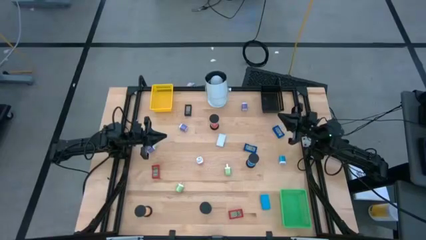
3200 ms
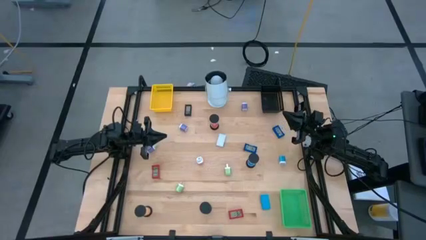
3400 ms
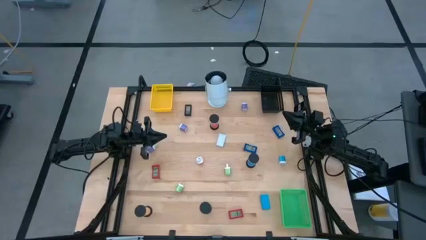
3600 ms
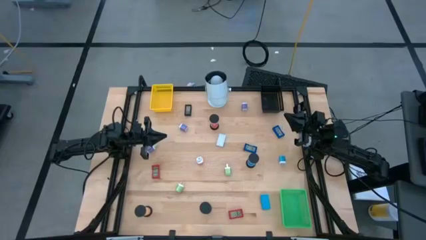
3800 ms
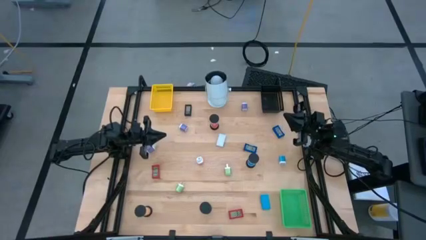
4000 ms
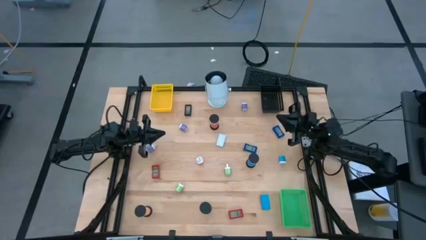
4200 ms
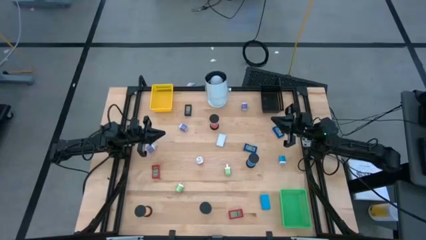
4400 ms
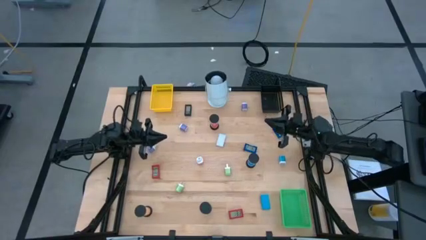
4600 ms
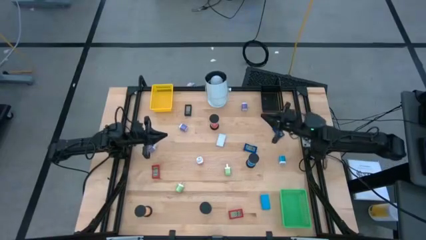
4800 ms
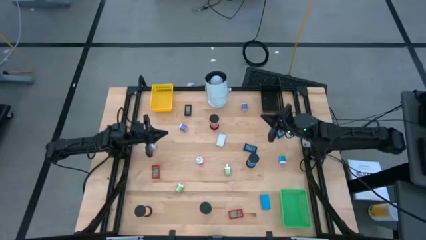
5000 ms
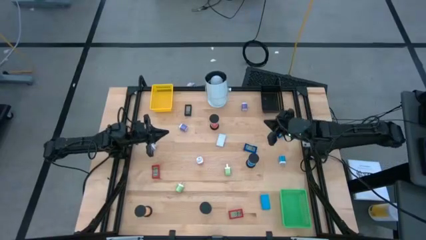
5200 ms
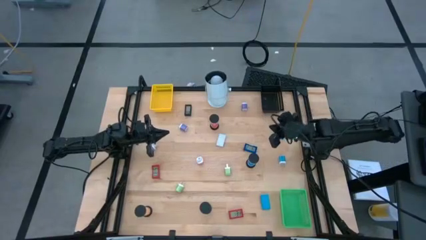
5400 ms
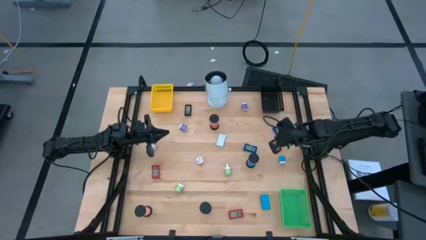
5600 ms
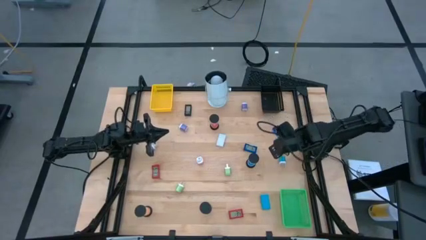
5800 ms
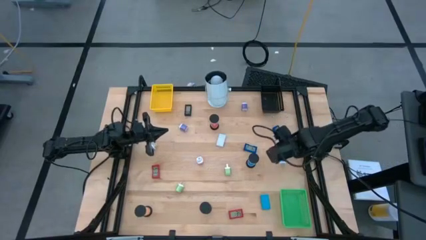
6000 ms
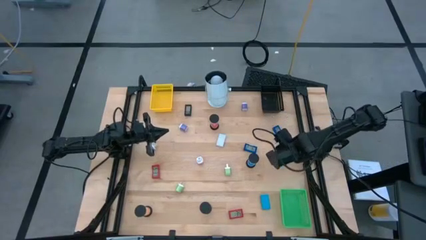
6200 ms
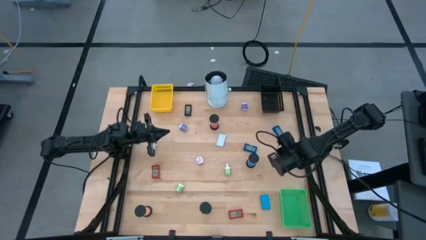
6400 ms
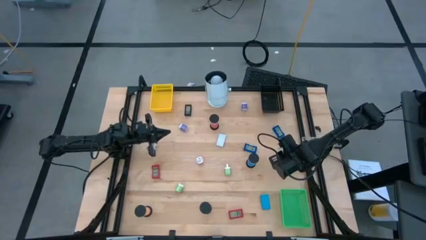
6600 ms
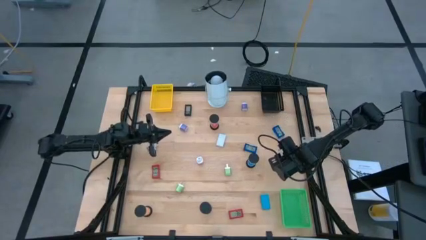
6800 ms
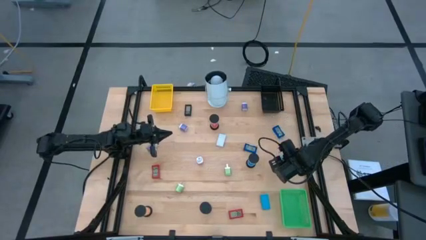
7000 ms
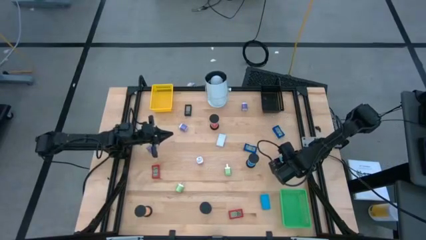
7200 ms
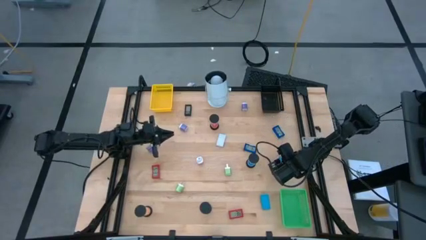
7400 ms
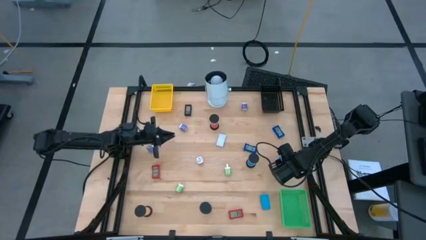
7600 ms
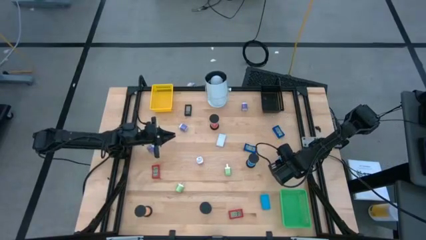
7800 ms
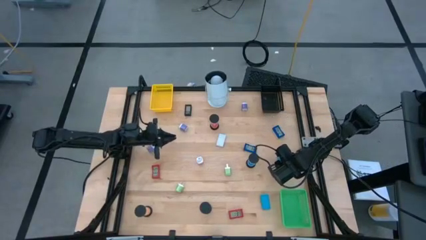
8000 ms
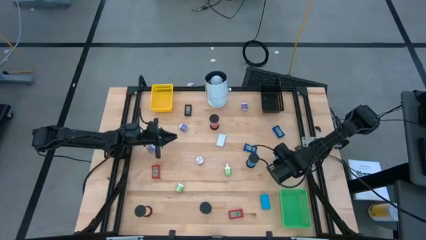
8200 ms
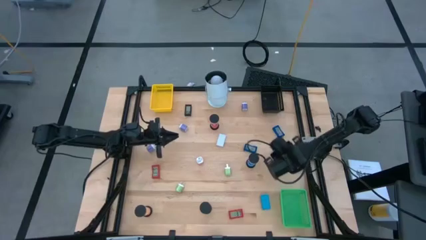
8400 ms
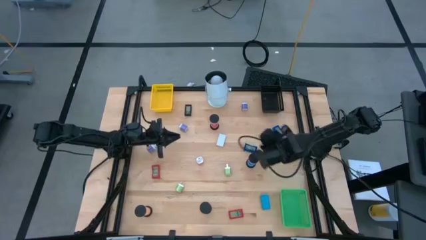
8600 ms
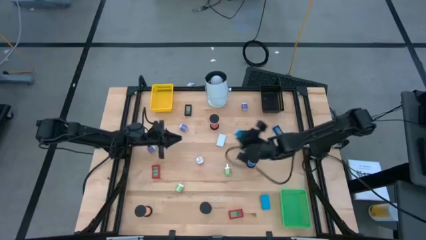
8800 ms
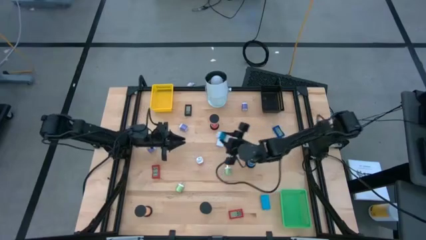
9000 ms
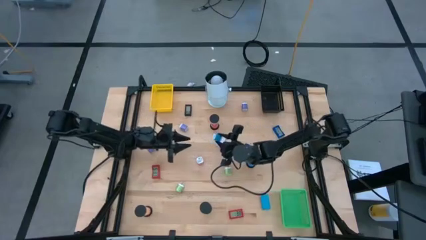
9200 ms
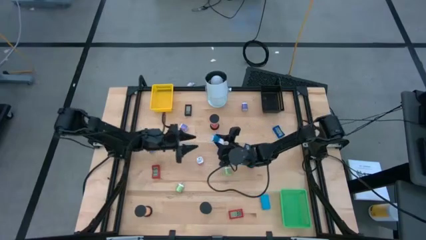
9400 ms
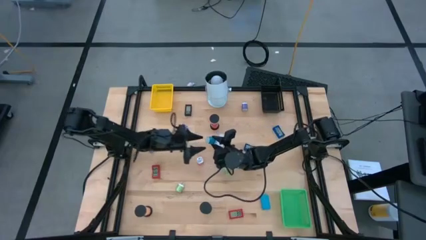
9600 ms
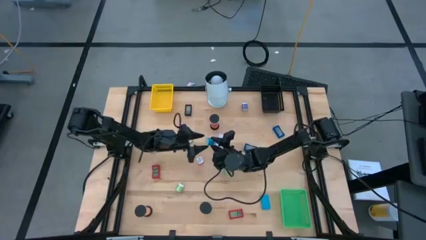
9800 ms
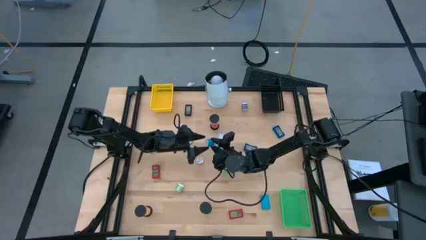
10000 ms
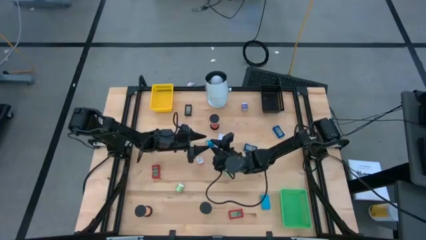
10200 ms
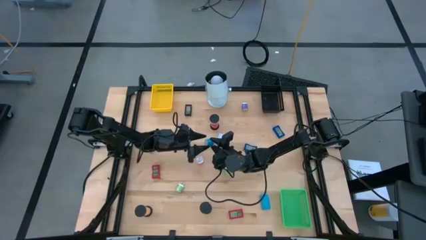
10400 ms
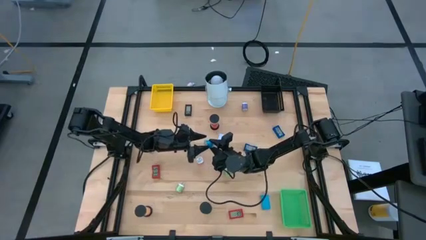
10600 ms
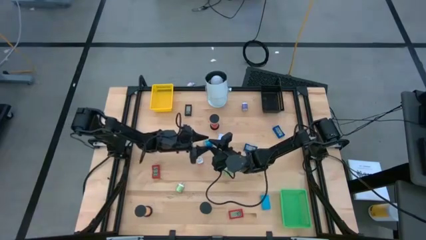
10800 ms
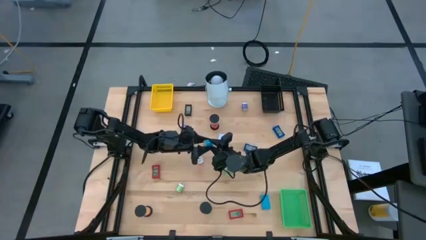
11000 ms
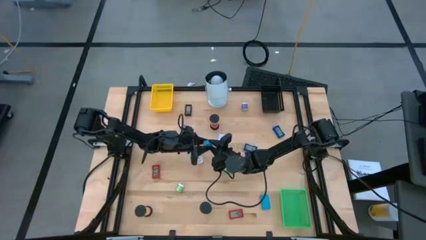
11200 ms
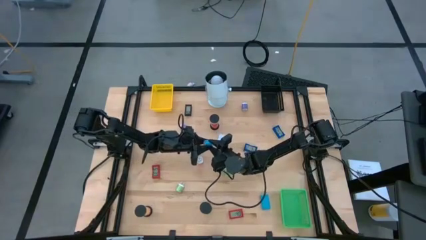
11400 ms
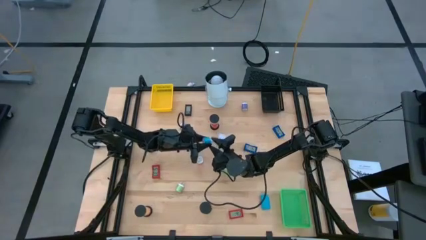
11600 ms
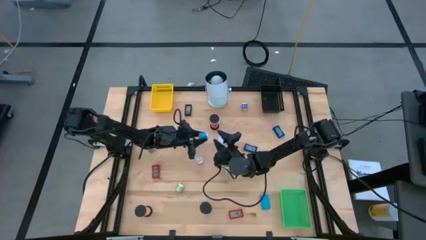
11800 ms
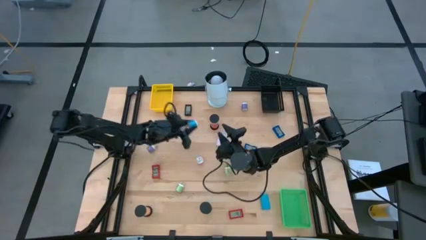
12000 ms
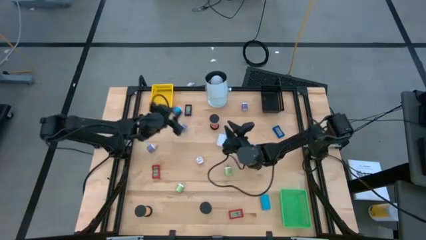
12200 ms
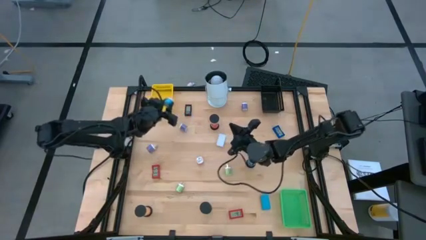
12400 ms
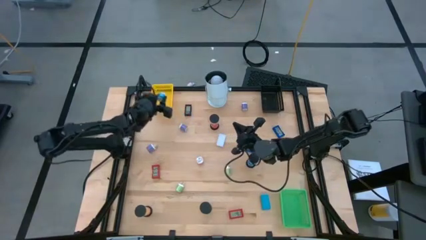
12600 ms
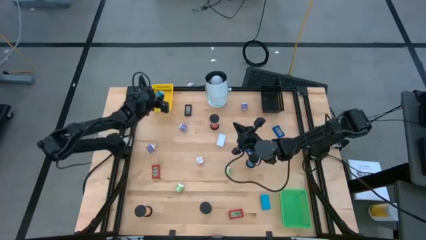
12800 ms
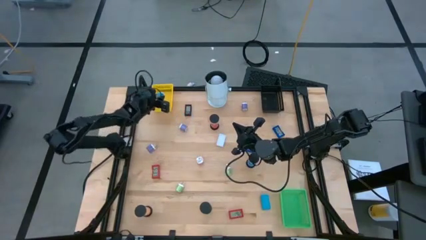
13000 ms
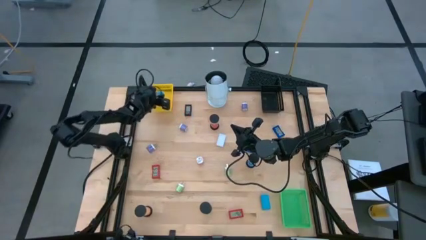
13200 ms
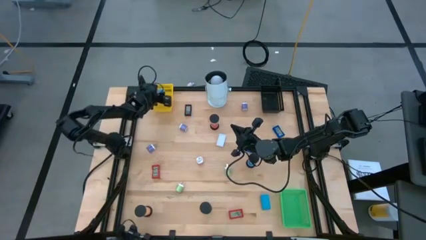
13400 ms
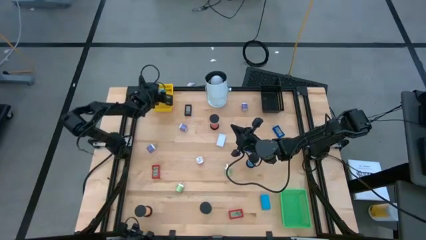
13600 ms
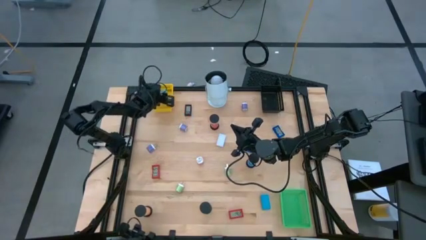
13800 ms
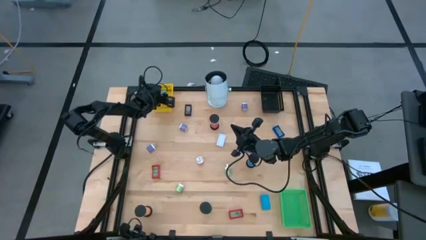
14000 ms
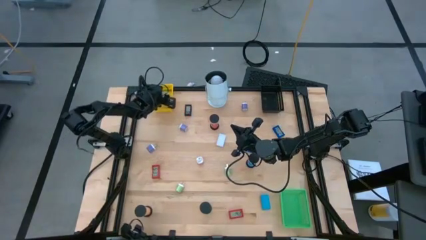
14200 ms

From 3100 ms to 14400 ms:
Task: Pick & Place Office items
Put the blue charger adapter in the yellow bin

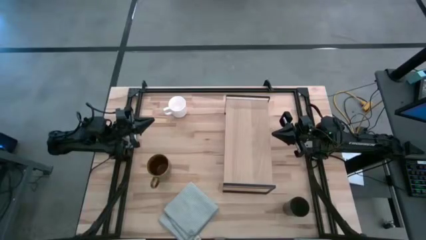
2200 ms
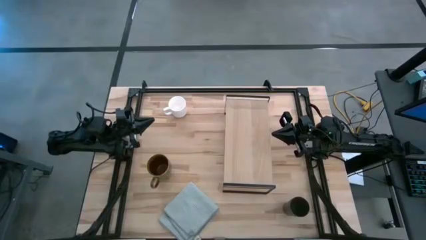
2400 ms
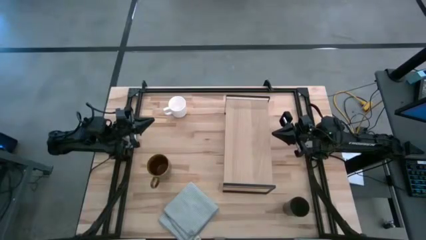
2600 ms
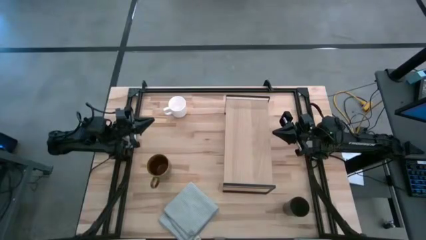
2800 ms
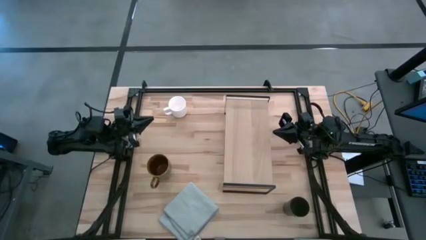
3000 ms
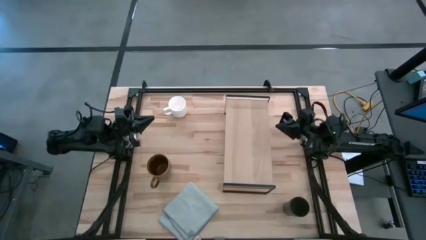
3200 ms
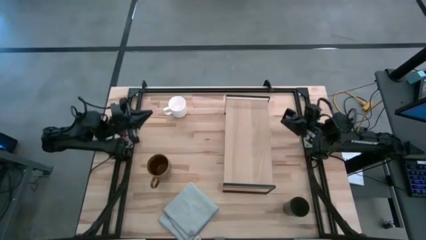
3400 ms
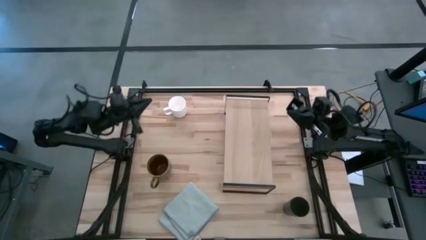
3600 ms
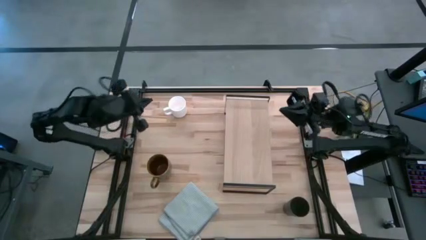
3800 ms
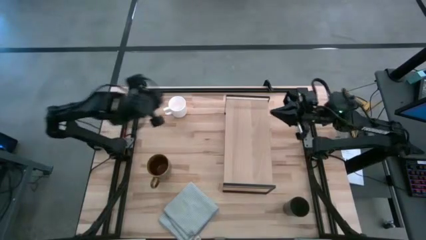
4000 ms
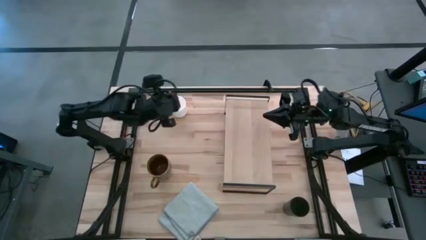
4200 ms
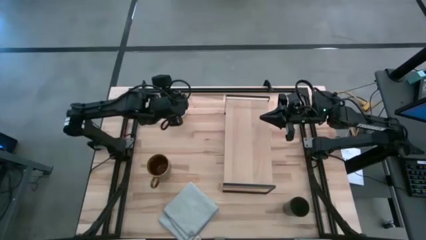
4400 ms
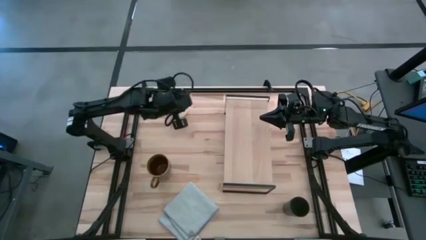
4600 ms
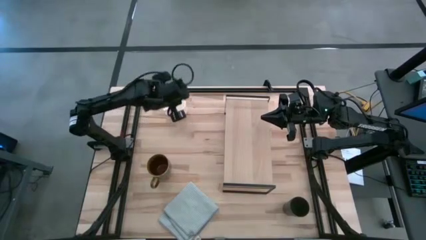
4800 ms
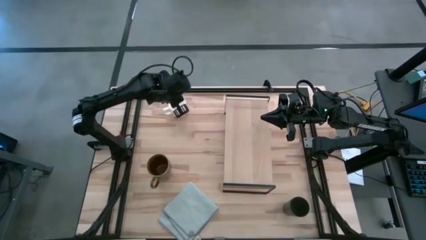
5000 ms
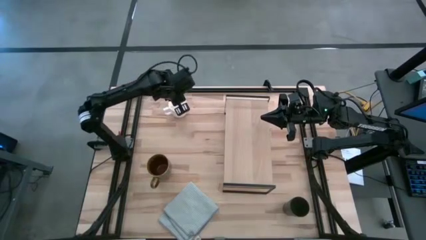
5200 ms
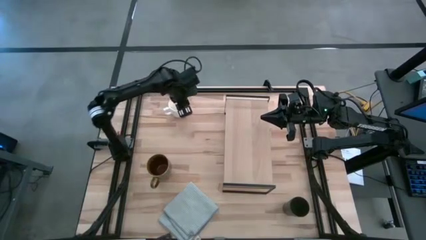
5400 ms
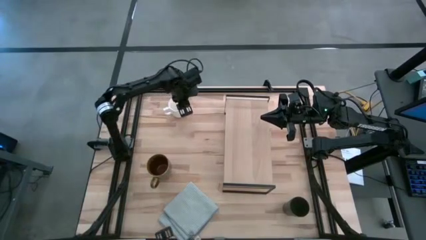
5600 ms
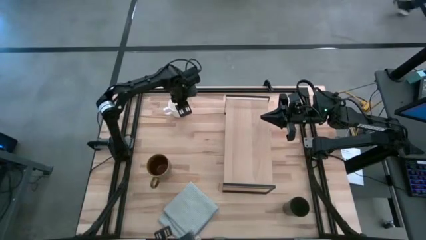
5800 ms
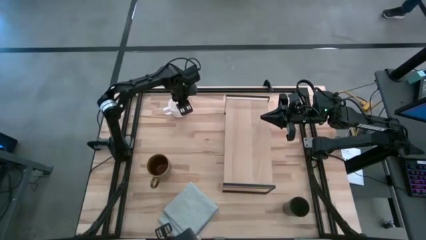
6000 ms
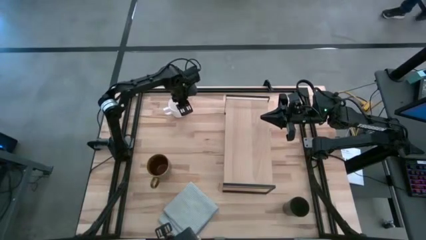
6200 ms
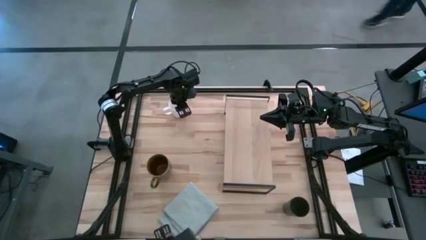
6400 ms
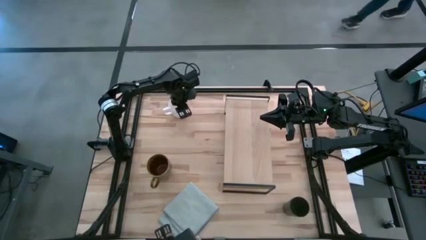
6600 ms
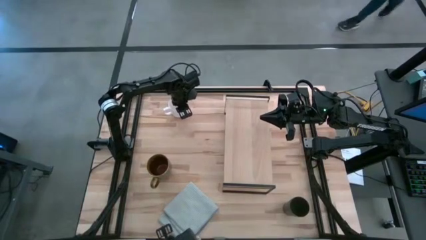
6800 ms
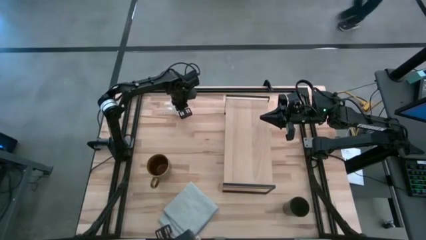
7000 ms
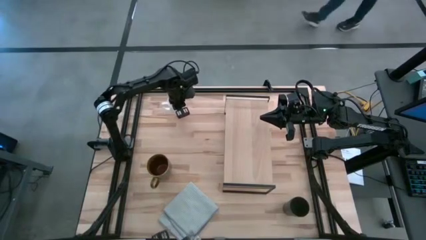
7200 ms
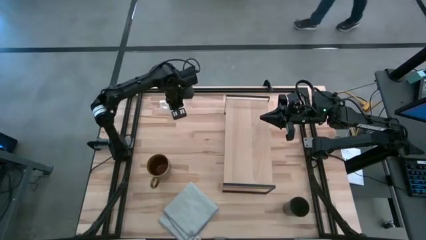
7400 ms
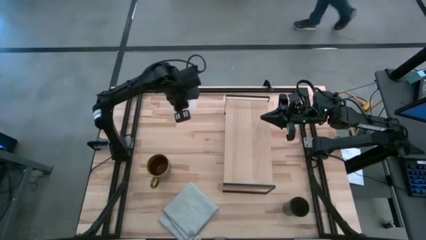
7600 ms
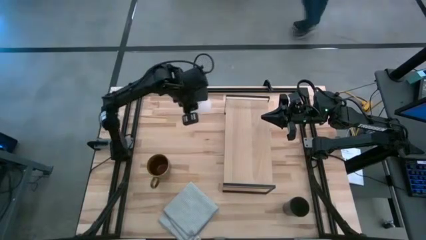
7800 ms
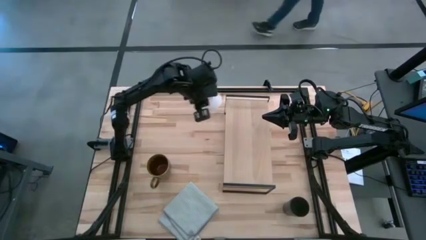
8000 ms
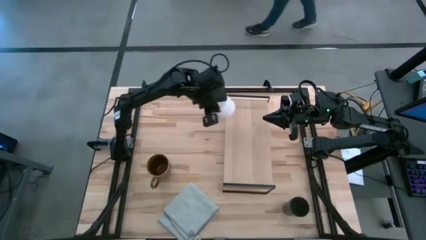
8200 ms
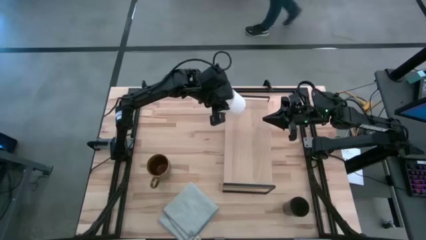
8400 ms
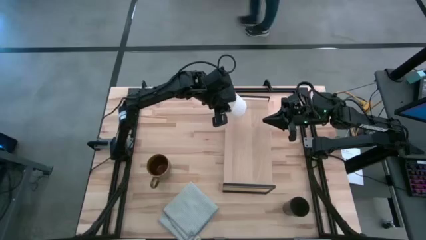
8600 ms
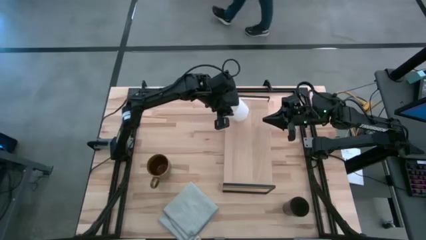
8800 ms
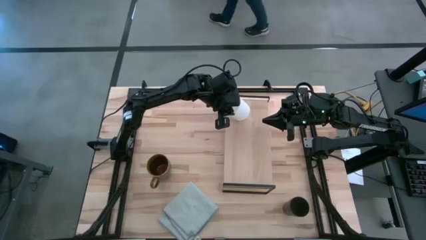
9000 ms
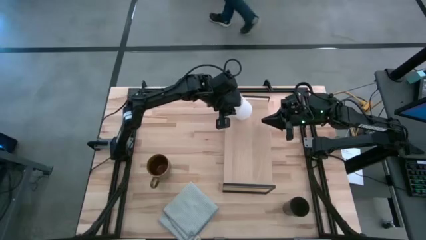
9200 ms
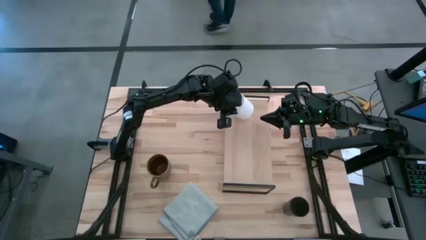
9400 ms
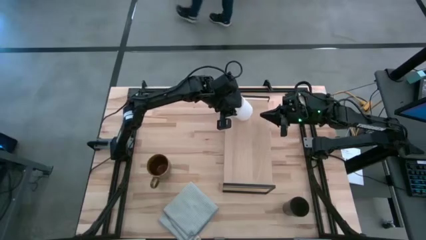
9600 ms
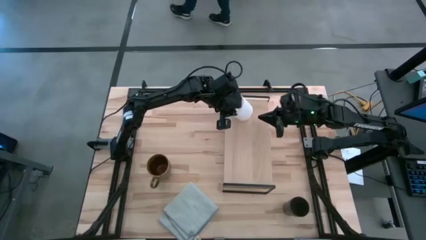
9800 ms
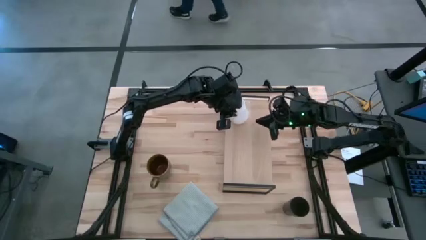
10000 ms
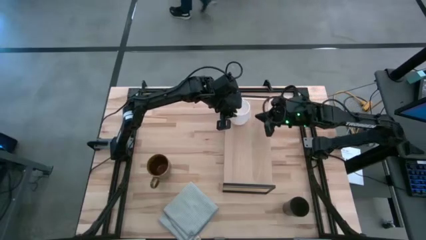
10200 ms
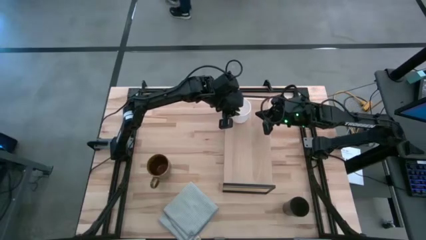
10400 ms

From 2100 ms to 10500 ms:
Task: Stack small to large cups/mugs on shelf
Put the white mug on the shelf
